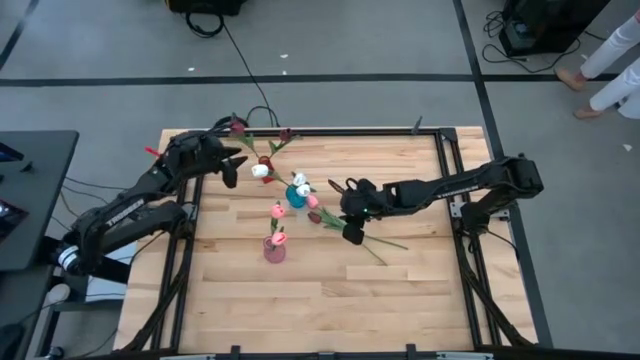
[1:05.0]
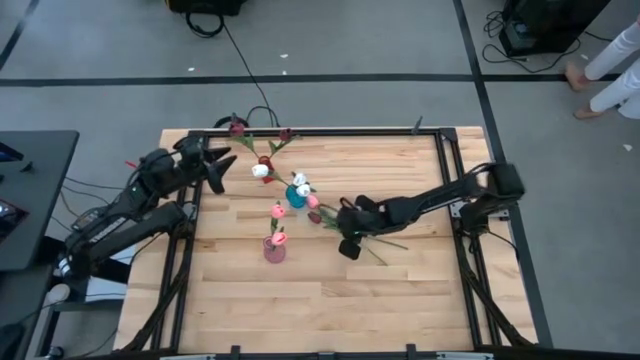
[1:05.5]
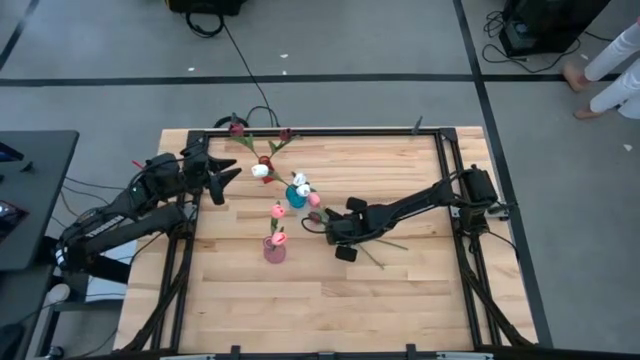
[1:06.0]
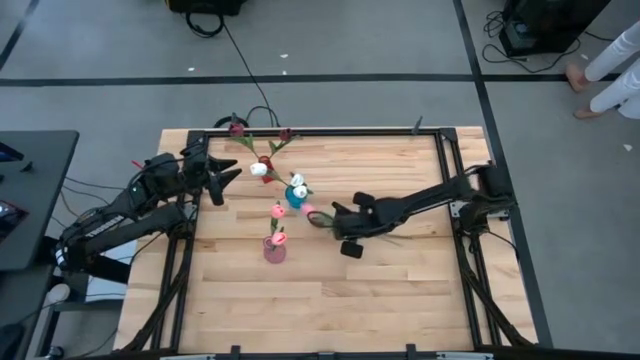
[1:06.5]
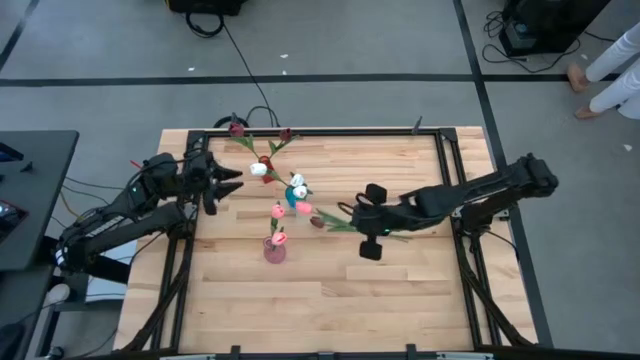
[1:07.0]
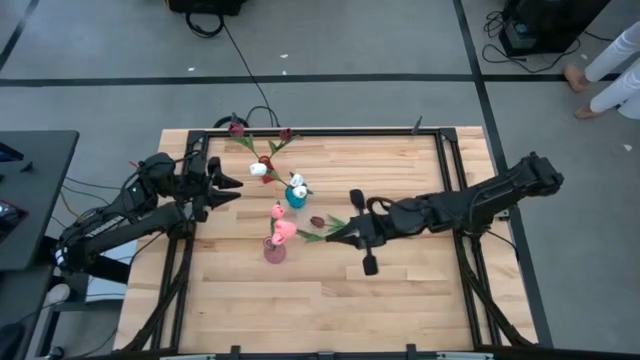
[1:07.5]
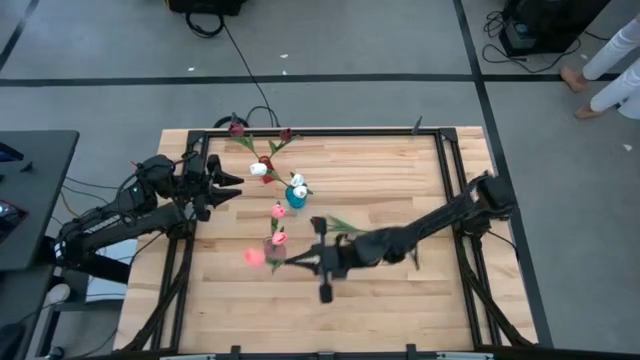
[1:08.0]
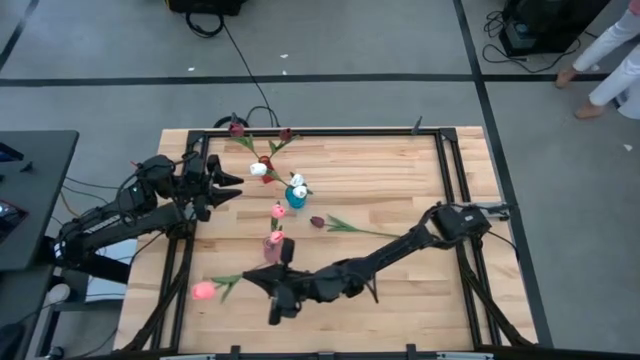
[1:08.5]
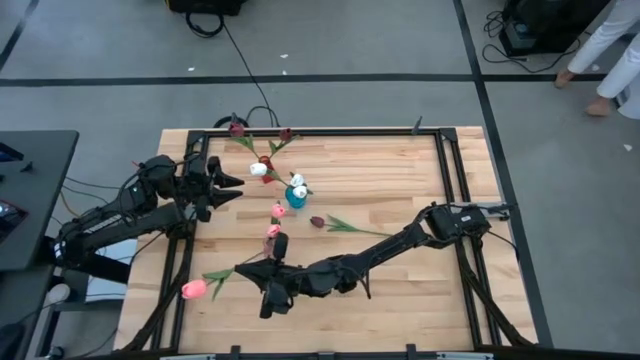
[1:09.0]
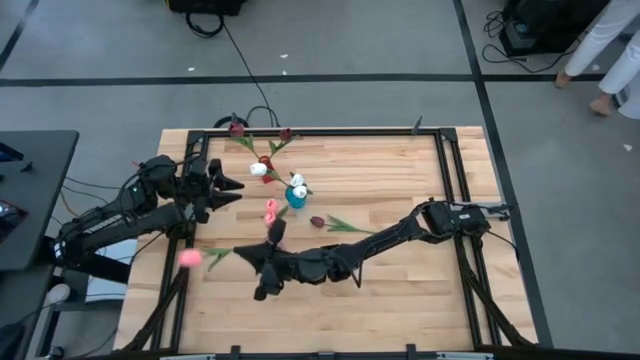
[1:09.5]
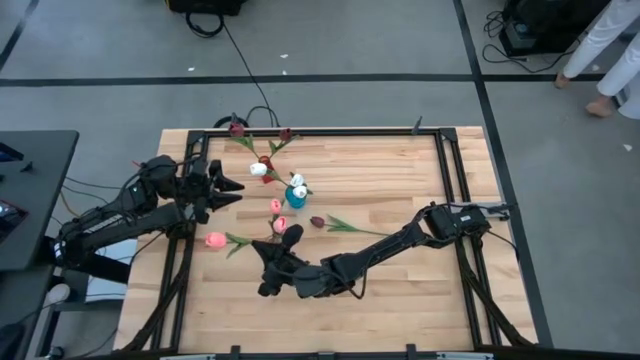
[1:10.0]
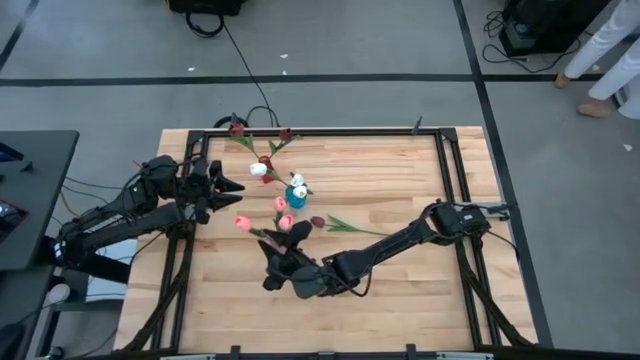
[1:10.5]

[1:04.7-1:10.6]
Task: Sort flowers into vase by color
Put the pink flower into the pink vase

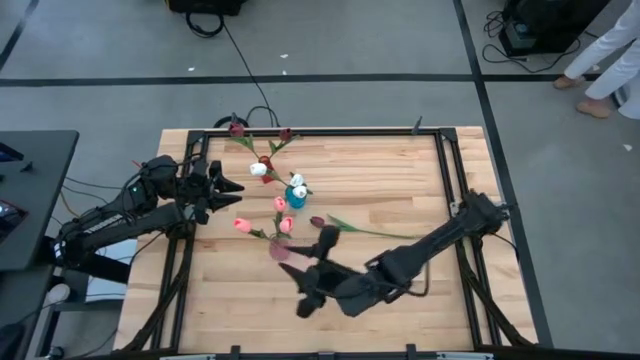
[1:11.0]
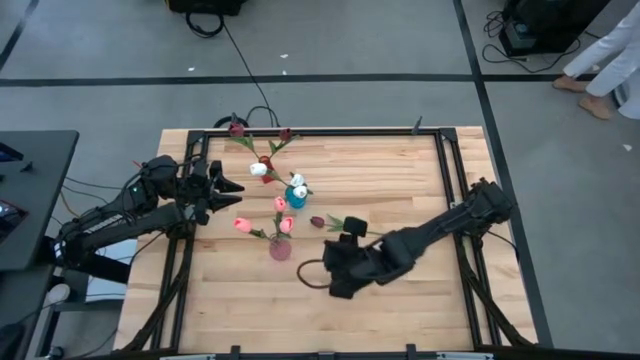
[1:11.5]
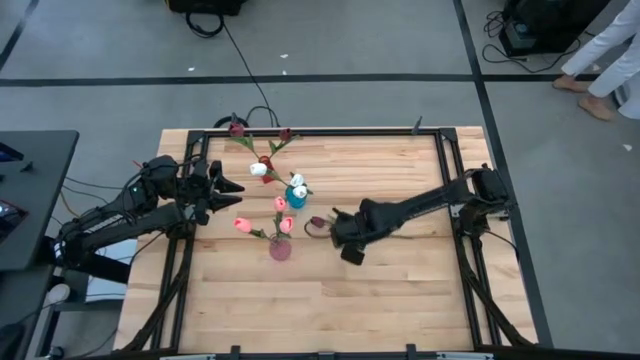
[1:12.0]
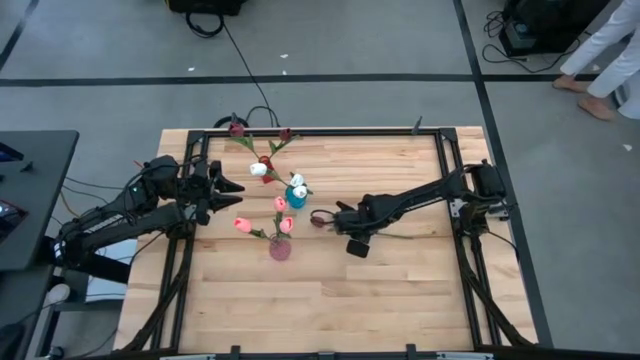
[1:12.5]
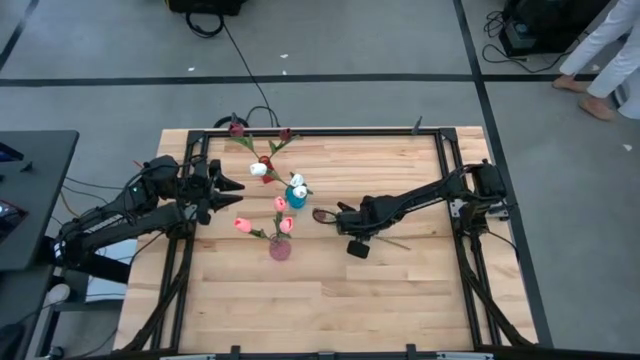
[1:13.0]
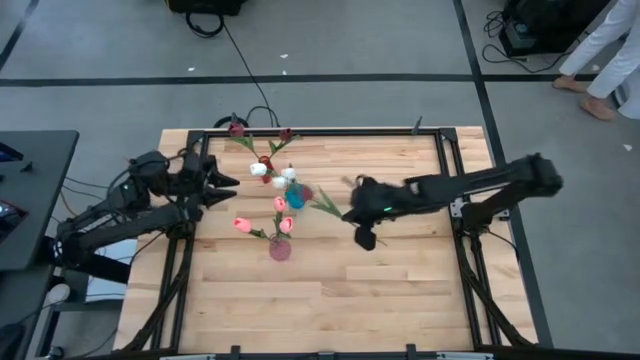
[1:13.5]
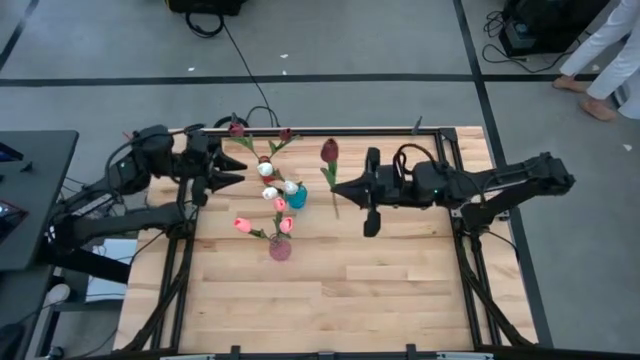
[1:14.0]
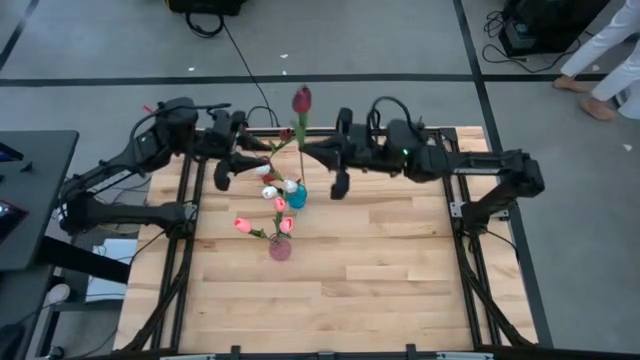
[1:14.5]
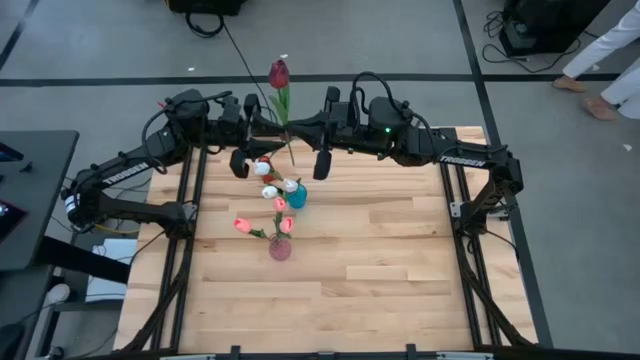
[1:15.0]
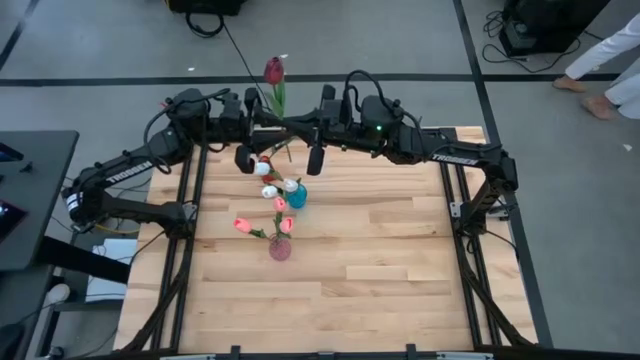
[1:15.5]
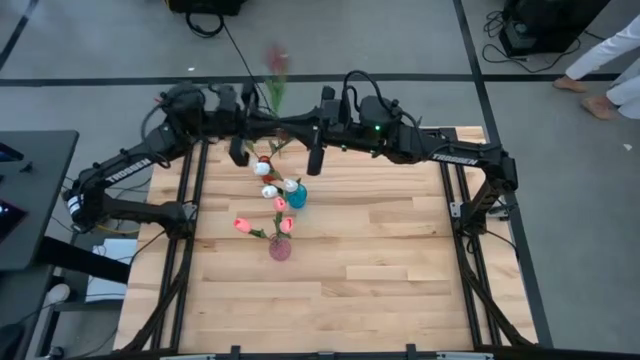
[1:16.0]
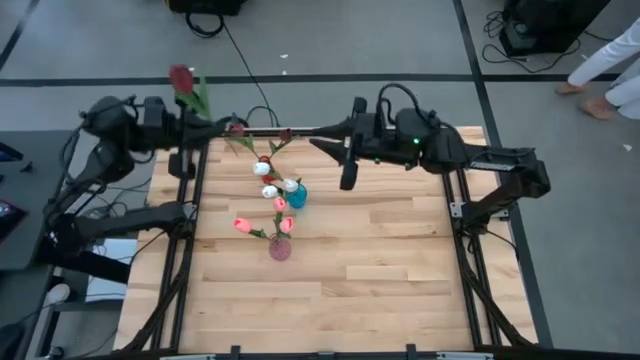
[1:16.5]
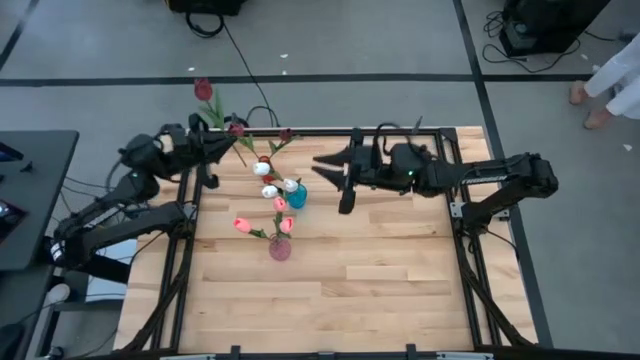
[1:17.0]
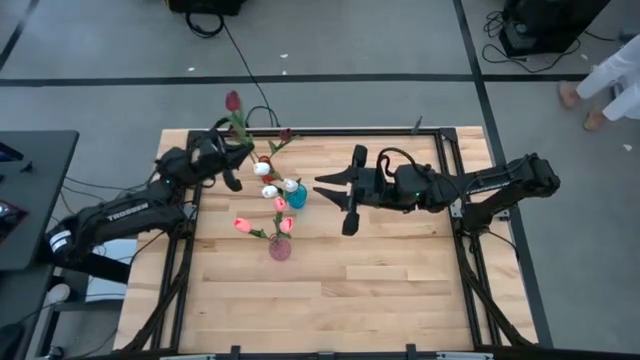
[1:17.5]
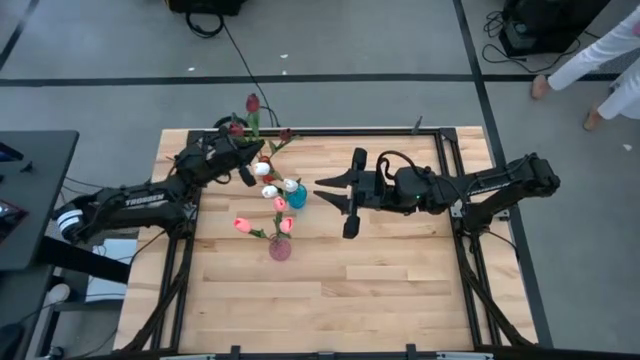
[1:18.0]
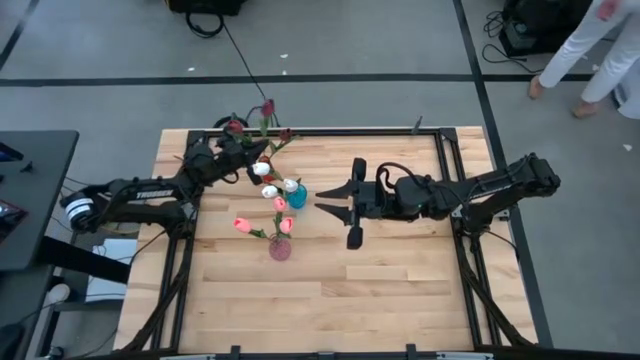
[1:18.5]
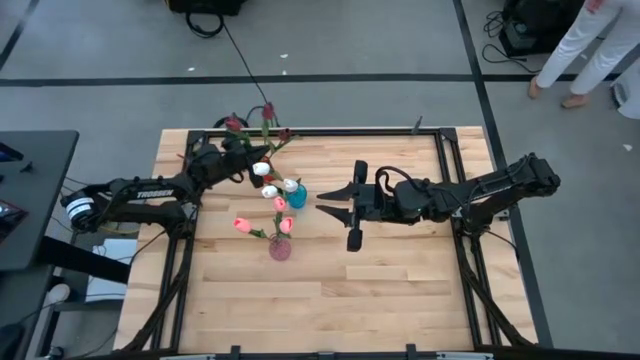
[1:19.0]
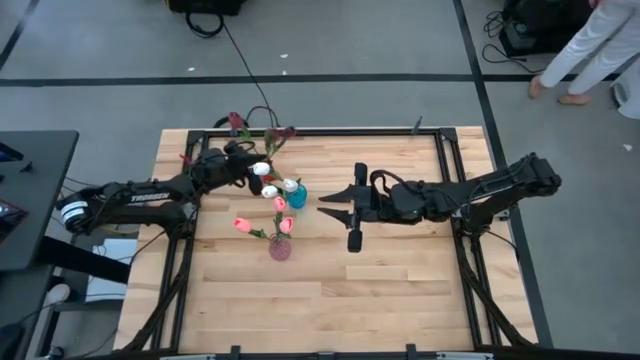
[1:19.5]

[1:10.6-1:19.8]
Put the red flower into the red vase

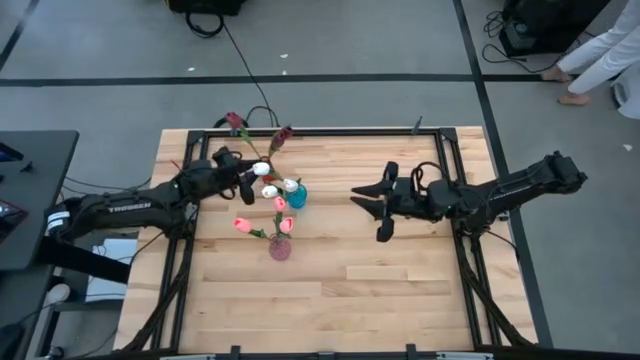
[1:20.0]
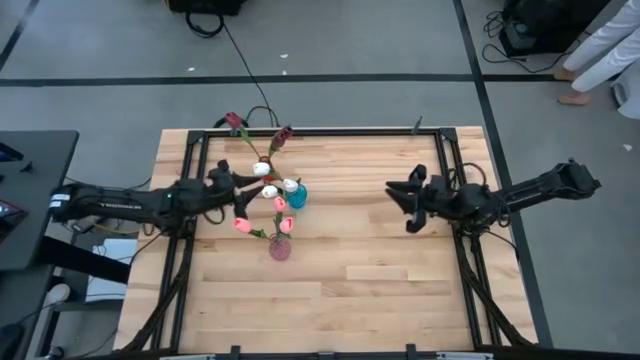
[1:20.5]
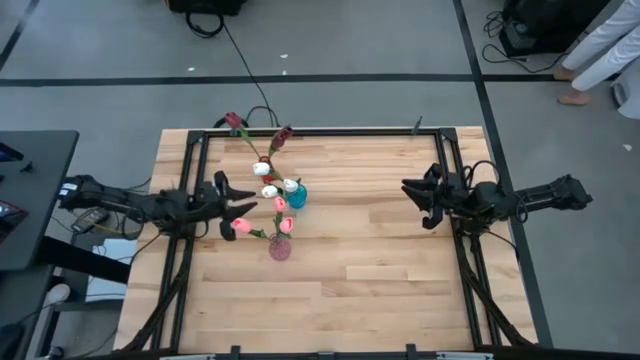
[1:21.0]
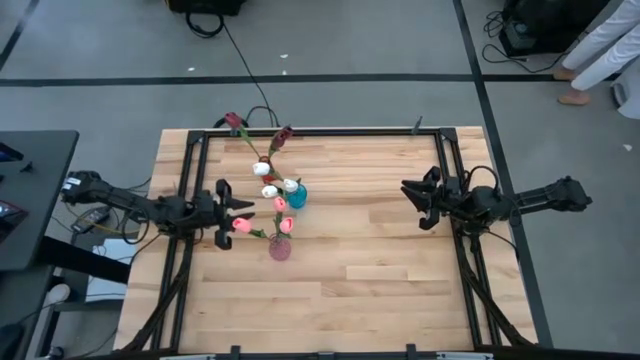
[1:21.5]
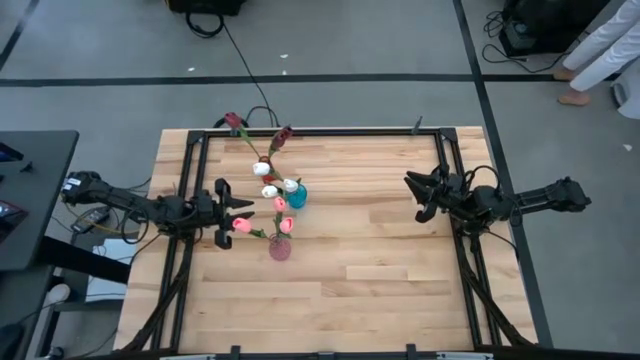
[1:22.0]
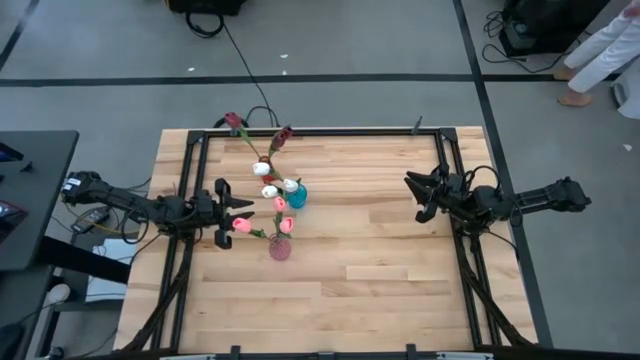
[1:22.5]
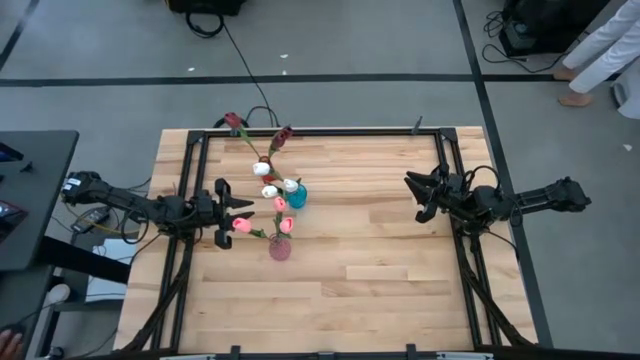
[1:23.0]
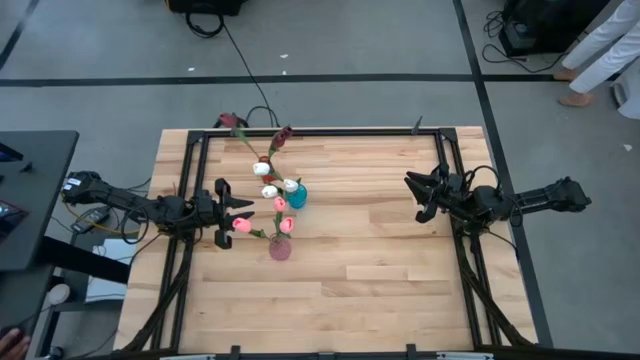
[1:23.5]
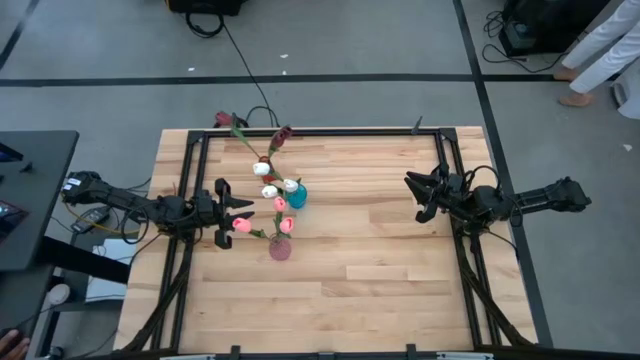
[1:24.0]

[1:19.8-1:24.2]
Return to Home Position

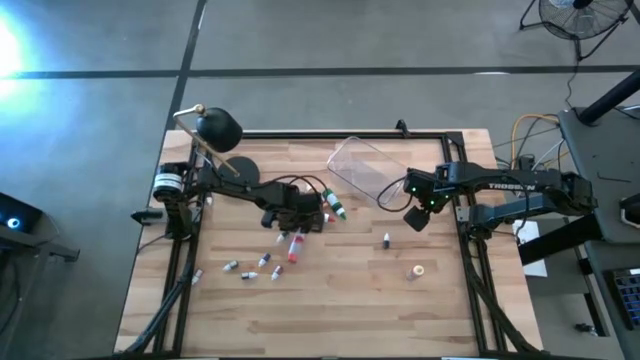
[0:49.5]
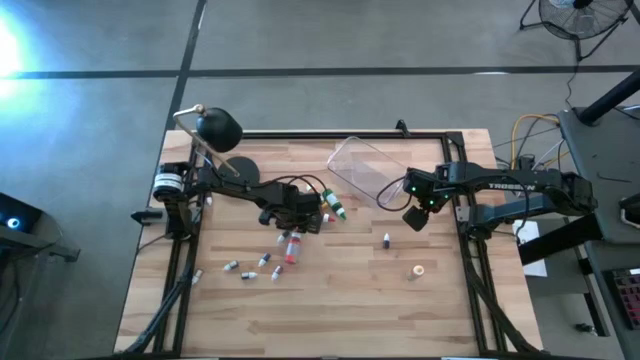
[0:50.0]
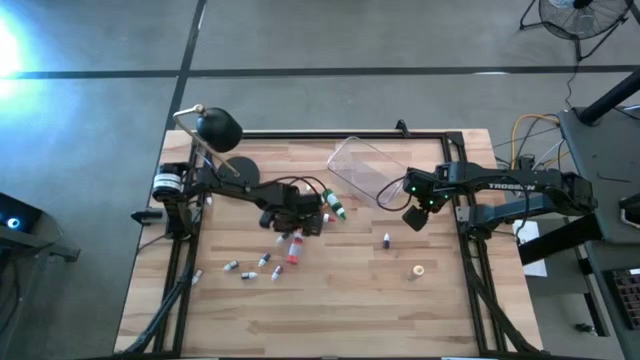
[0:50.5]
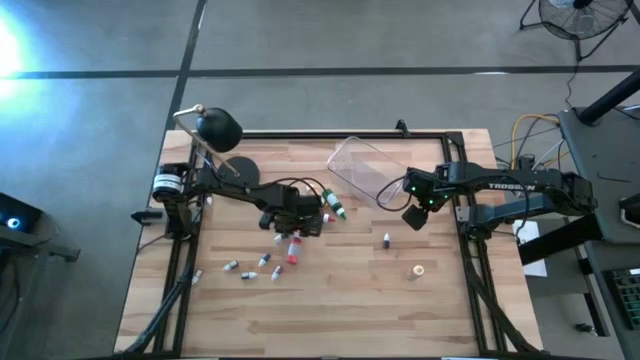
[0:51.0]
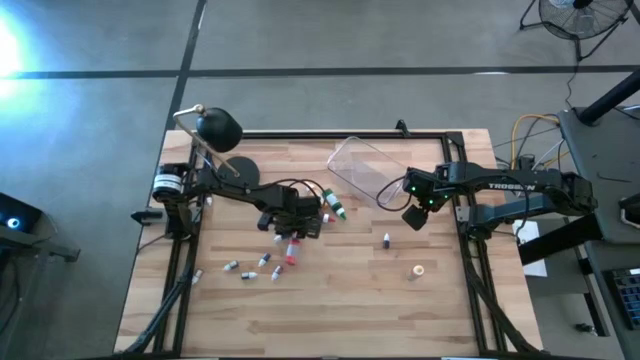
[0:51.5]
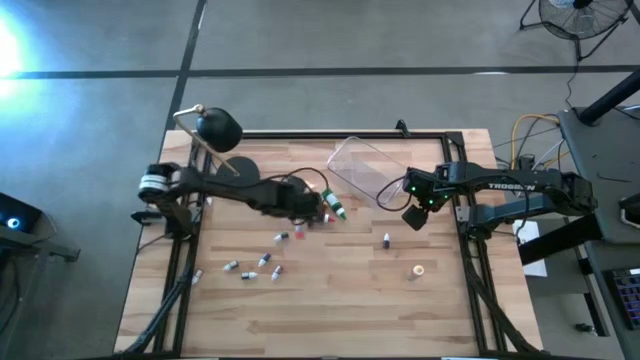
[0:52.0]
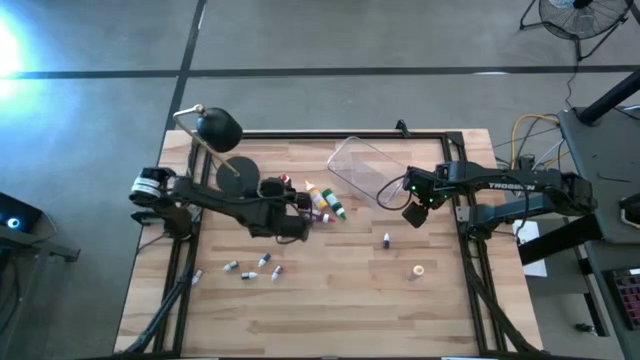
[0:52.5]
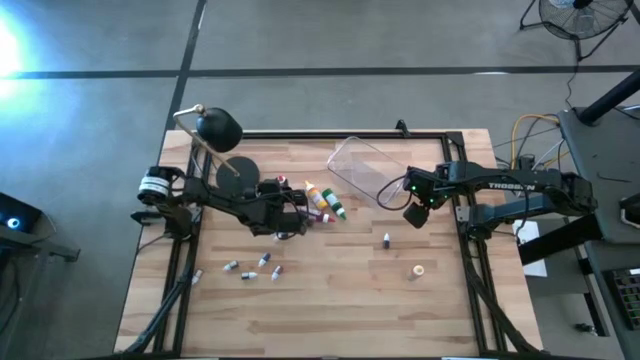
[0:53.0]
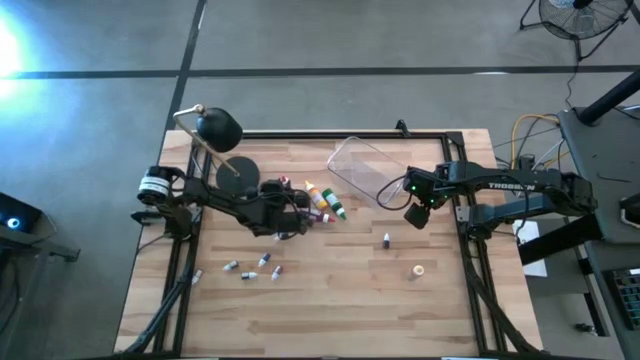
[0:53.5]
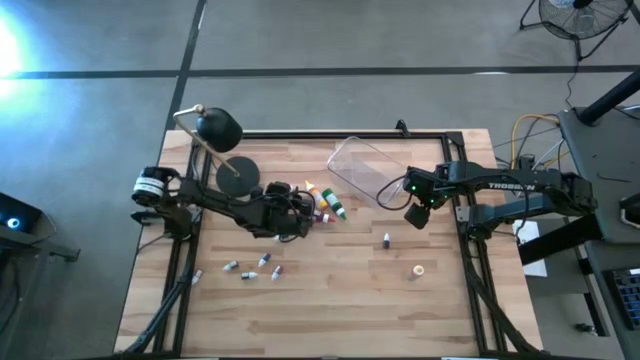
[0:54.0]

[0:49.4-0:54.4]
Task: Pick & Place food coloring
Adjust the large orange food coloring bottle
